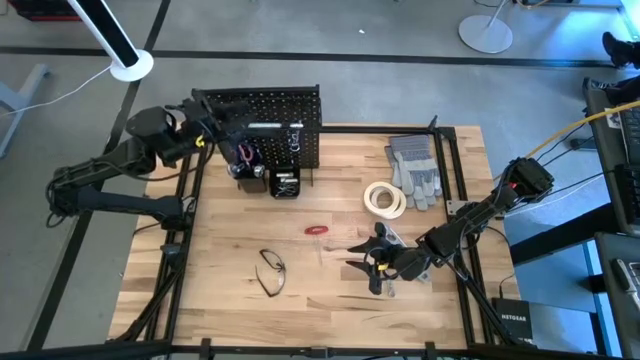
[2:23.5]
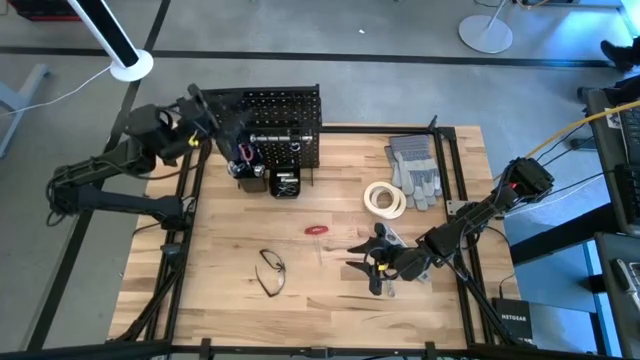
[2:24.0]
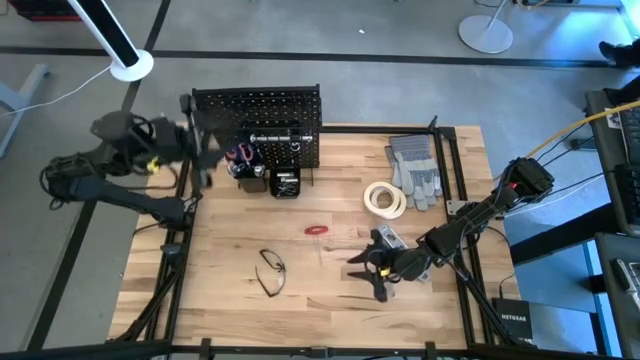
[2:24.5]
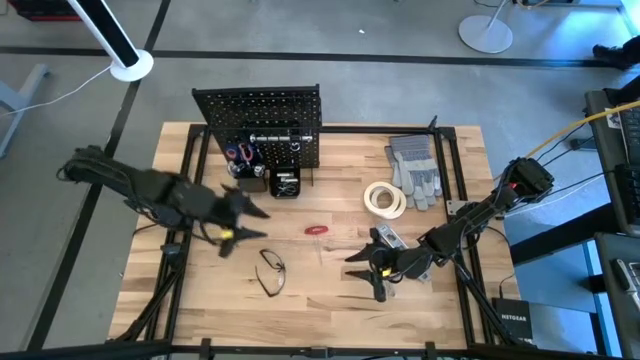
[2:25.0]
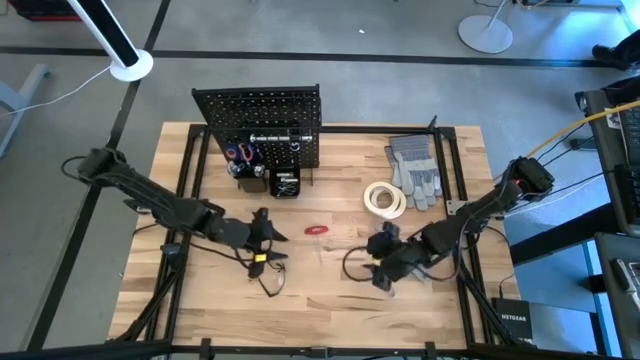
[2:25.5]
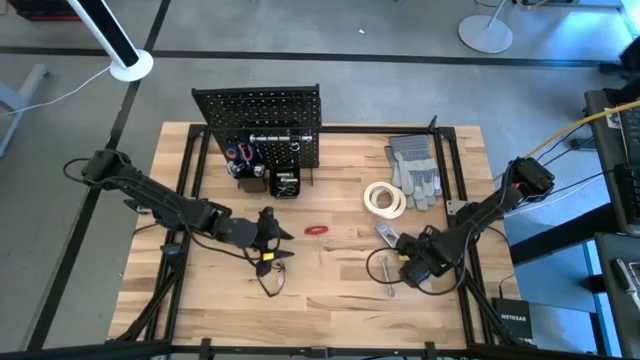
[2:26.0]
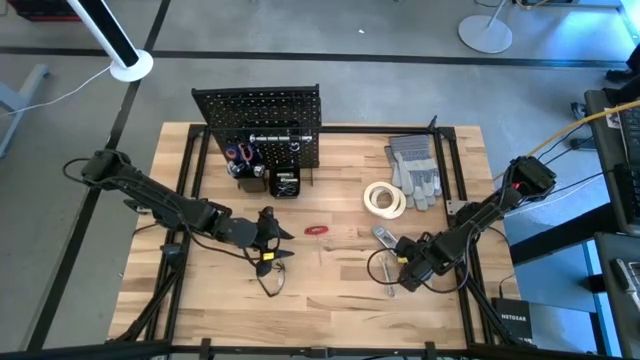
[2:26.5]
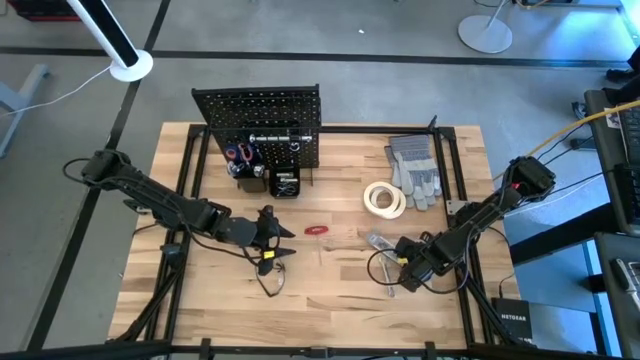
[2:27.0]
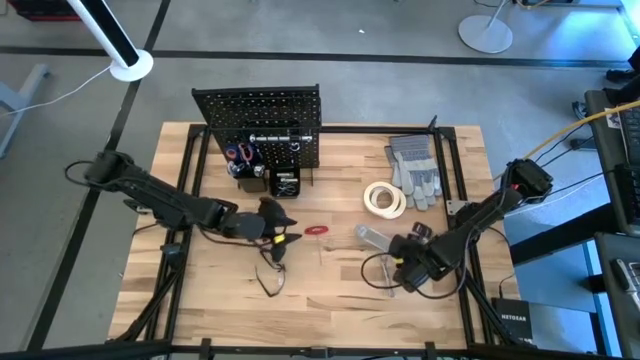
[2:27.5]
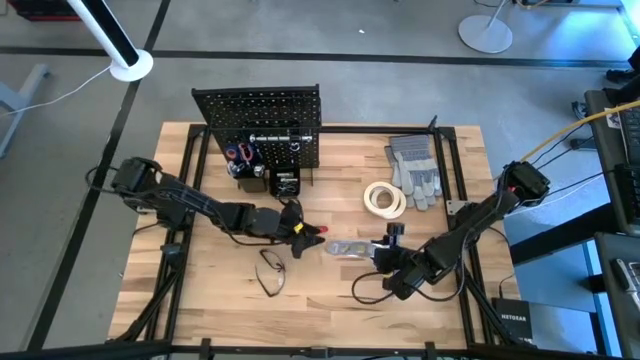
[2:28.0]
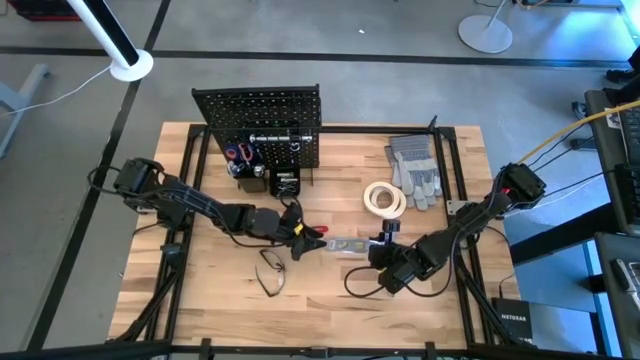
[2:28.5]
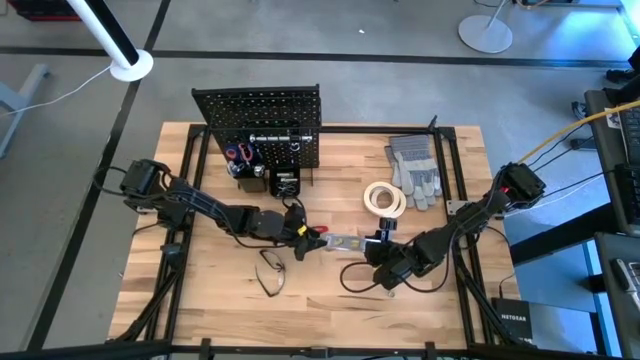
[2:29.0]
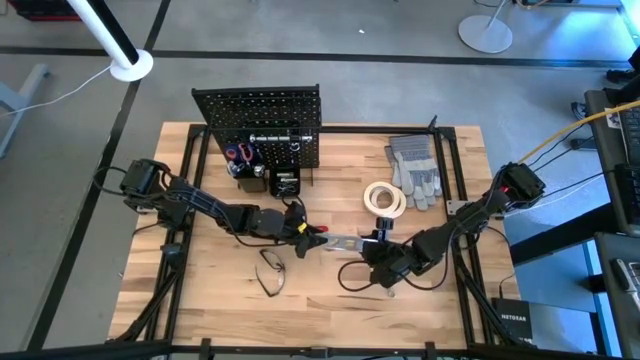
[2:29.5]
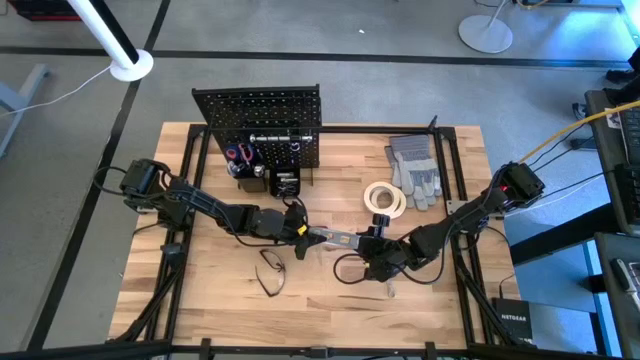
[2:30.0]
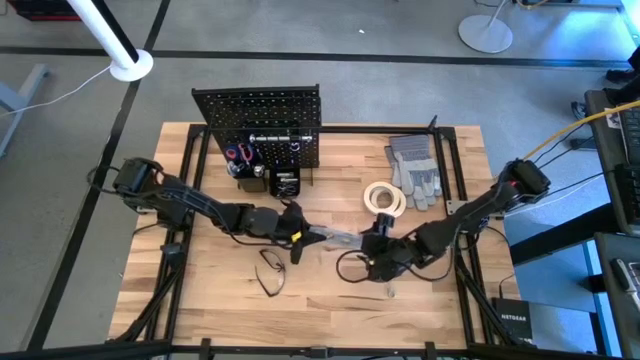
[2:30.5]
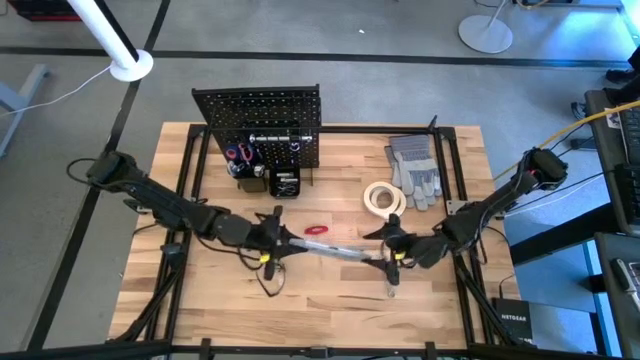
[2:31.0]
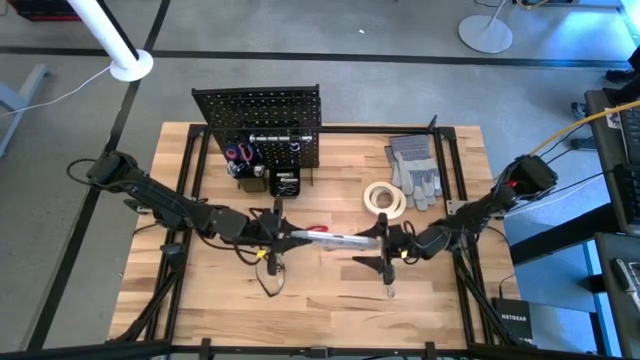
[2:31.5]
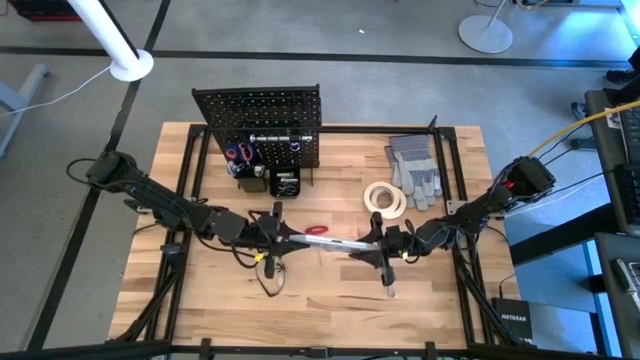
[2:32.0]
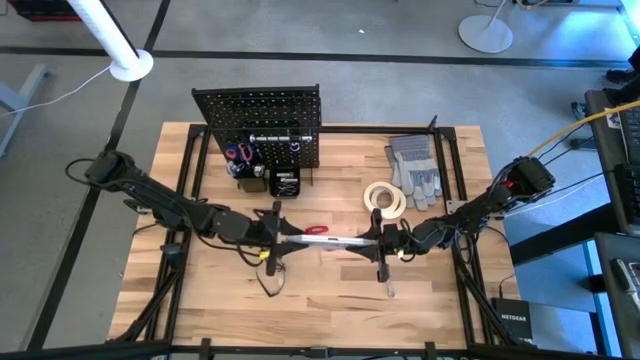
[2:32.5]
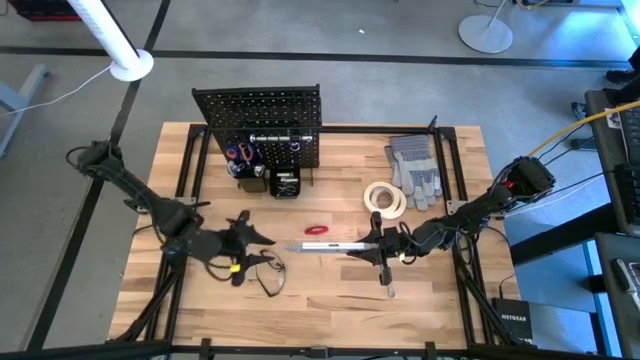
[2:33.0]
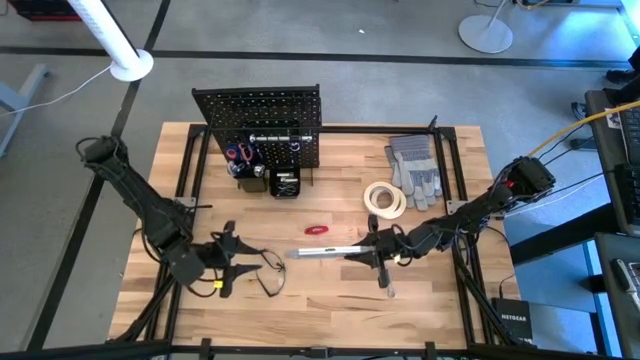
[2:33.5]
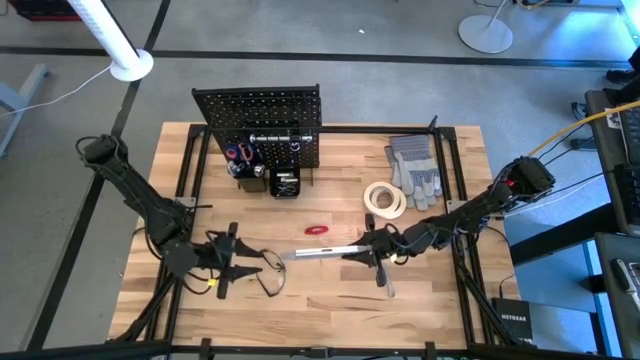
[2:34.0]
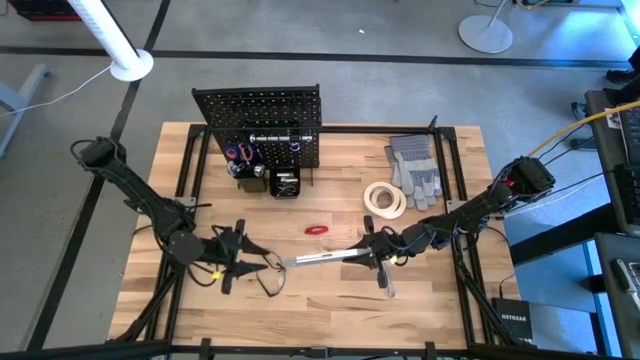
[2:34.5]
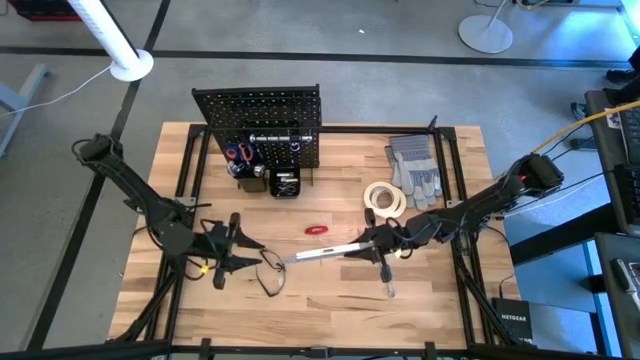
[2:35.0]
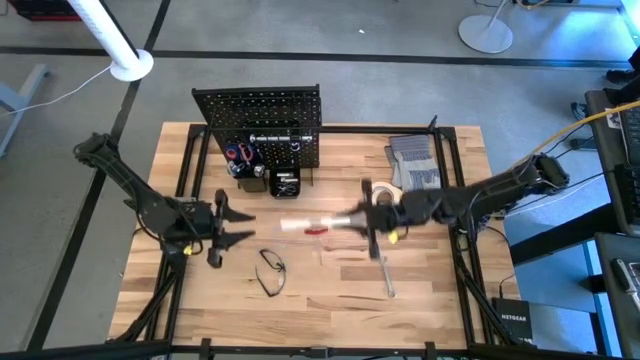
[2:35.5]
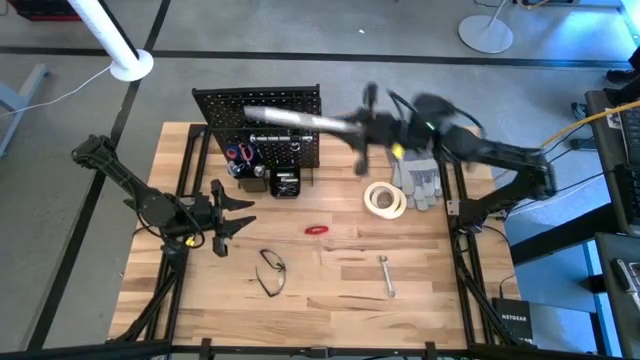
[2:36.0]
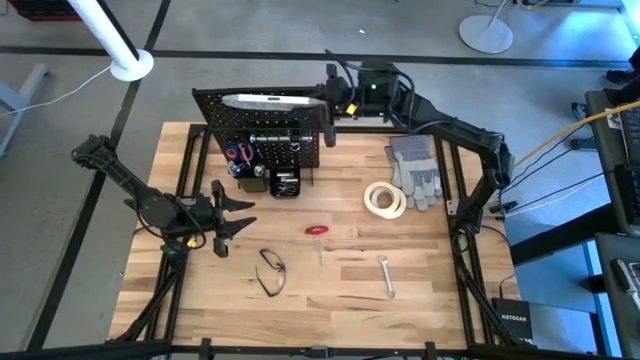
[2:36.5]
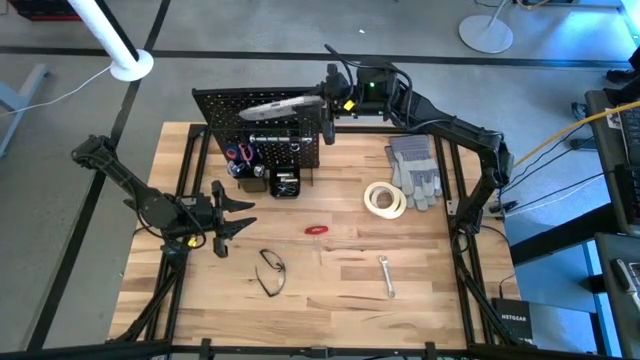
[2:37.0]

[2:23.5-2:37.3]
Task: Hang tools onto peg board
Put the spirit level on the peg board

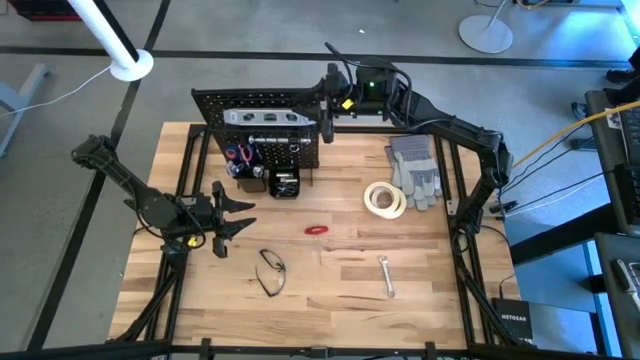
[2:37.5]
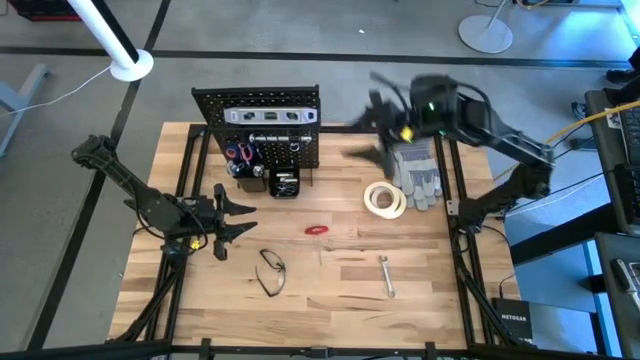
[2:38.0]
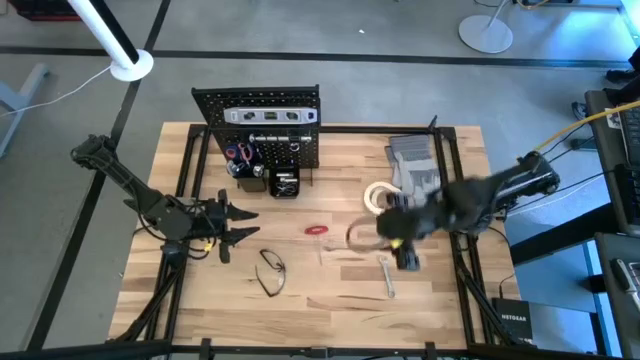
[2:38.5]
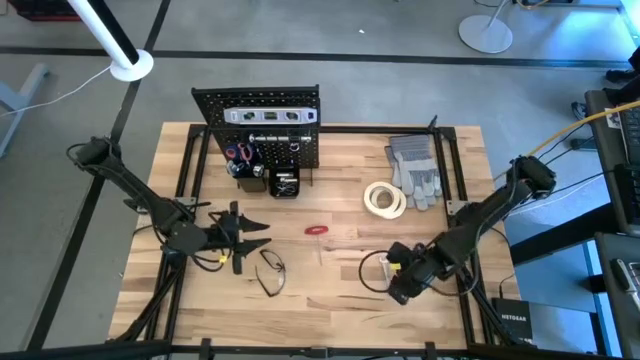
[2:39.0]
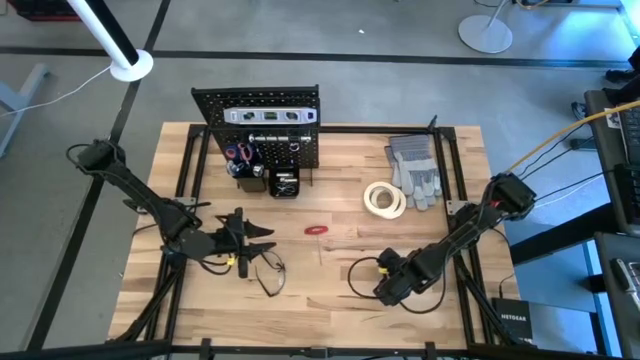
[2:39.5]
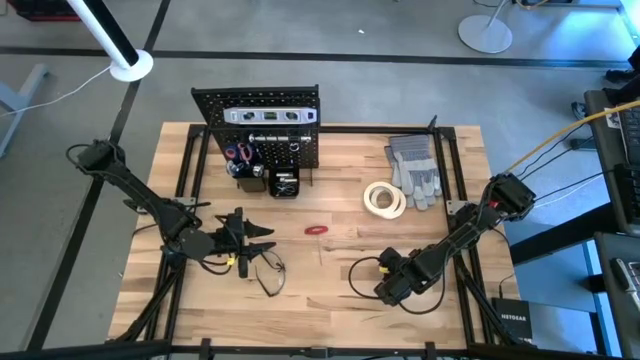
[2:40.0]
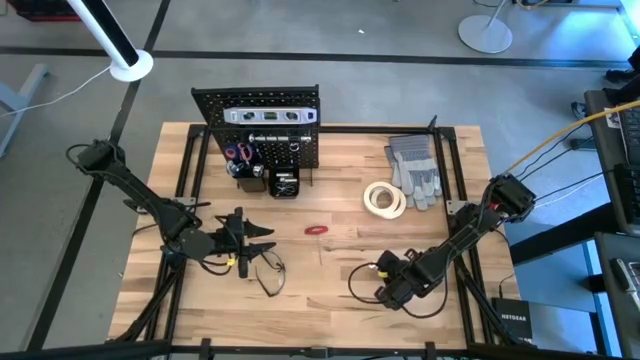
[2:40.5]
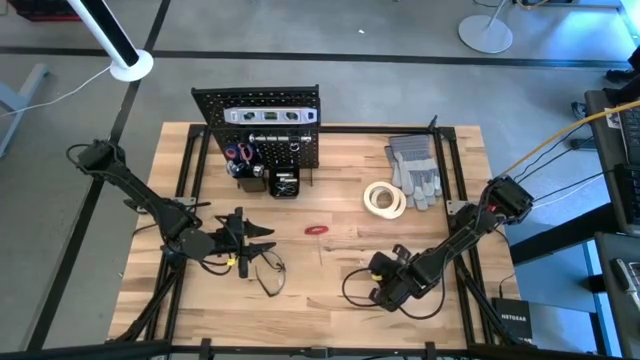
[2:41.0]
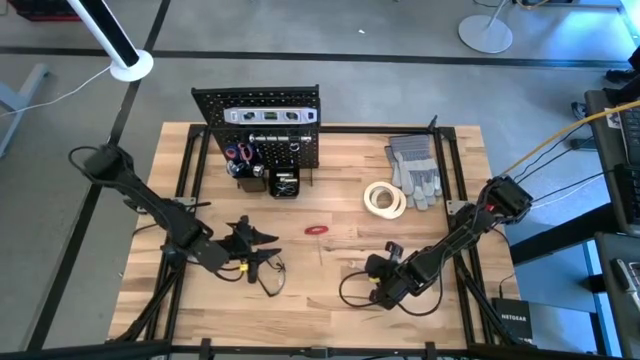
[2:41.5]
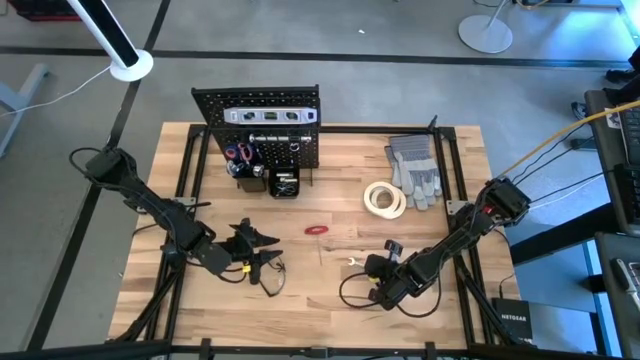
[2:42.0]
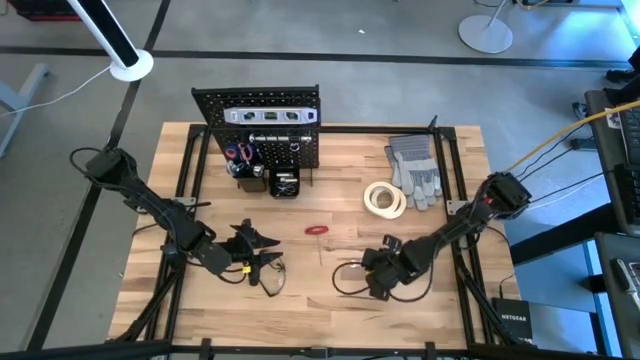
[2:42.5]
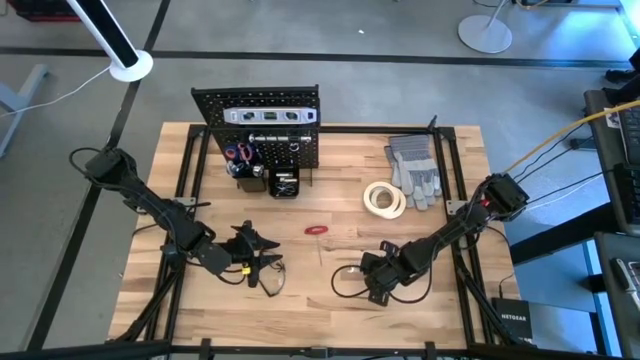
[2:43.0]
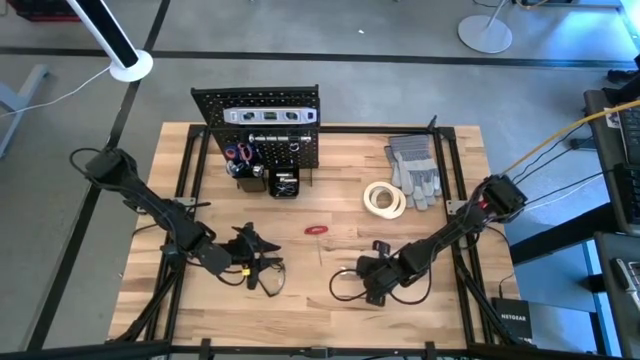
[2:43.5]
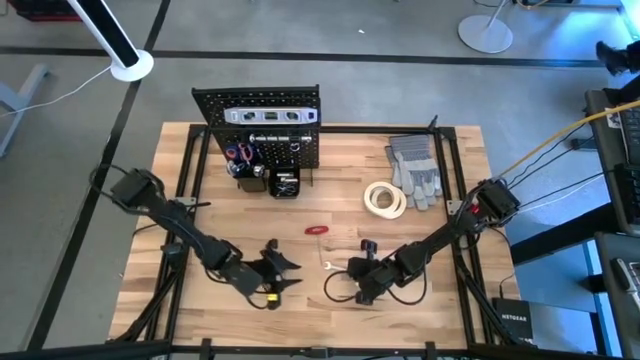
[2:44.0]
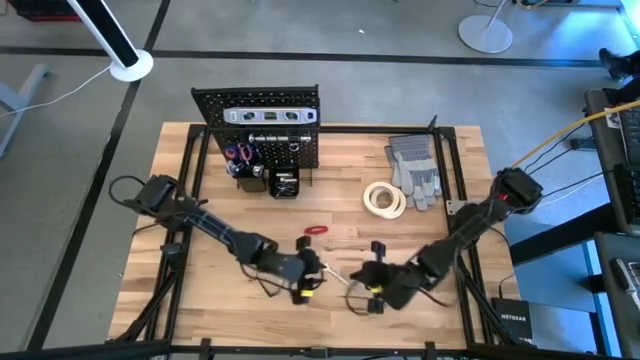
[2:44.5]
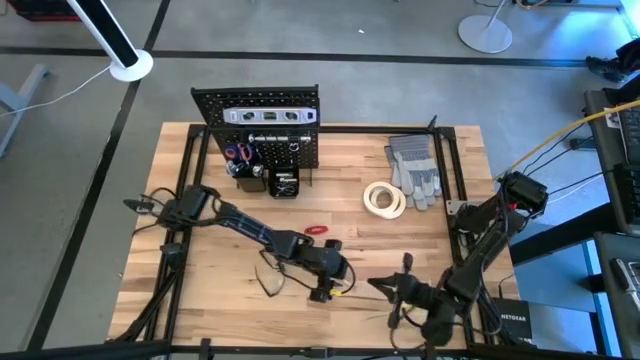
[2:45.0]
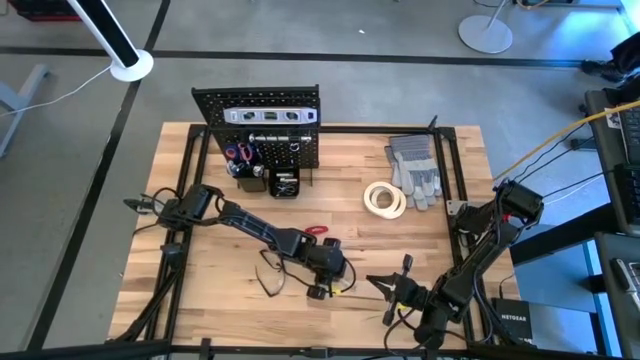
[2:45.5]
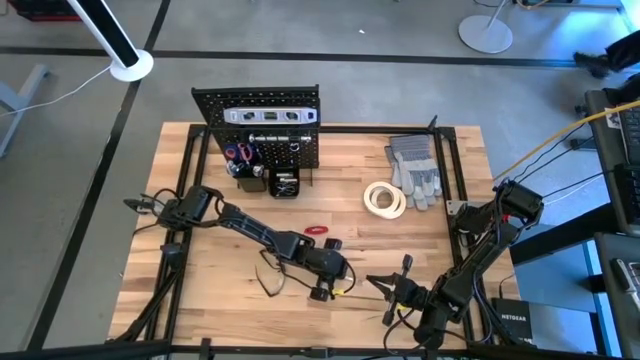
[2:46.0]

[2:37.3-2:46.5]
Put the wrench into the left pegboard organizer bin
